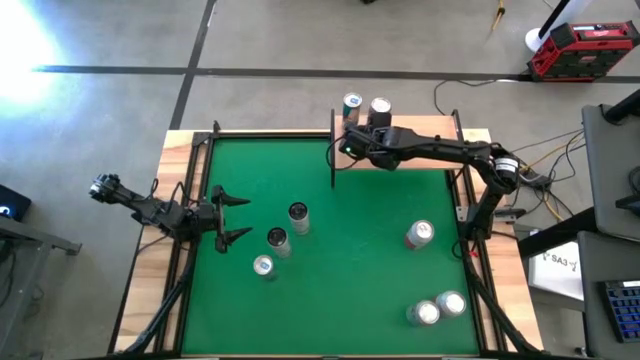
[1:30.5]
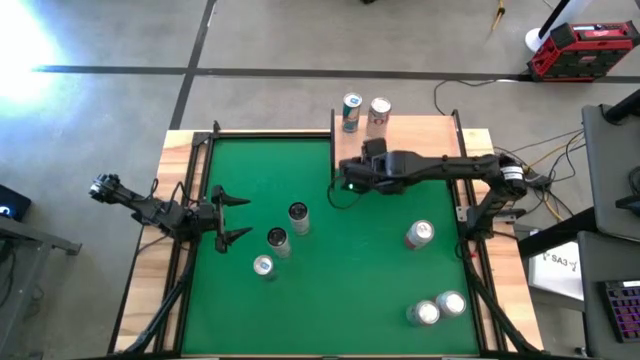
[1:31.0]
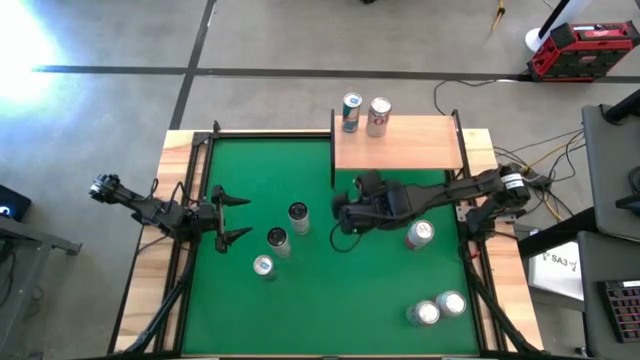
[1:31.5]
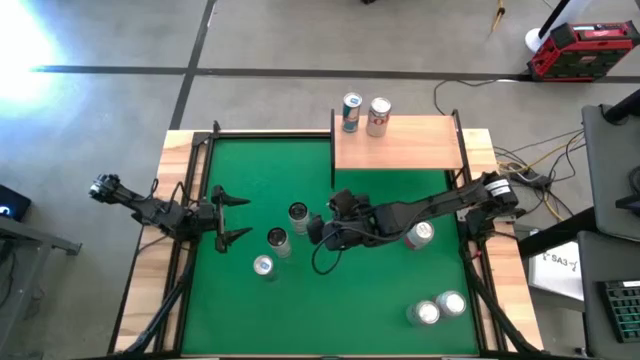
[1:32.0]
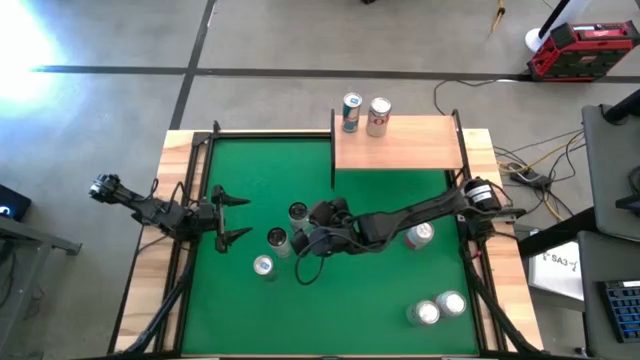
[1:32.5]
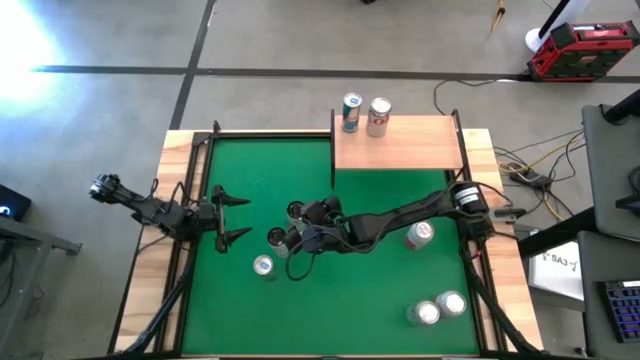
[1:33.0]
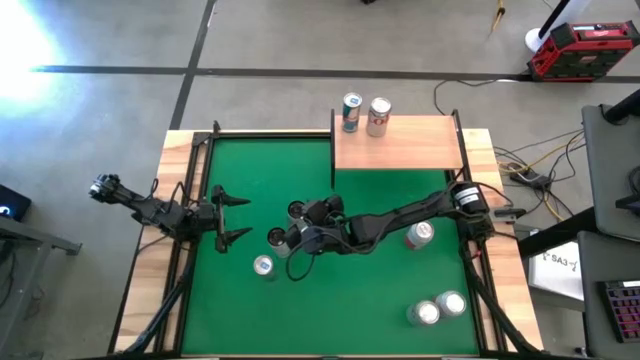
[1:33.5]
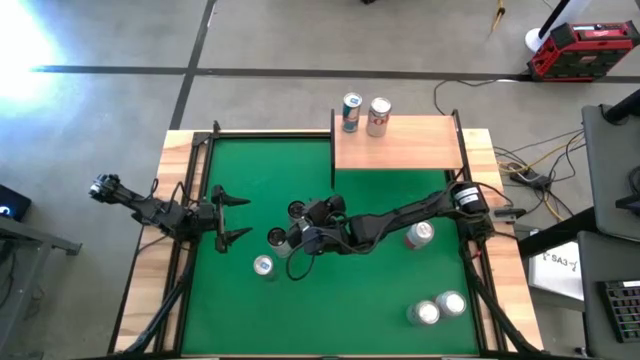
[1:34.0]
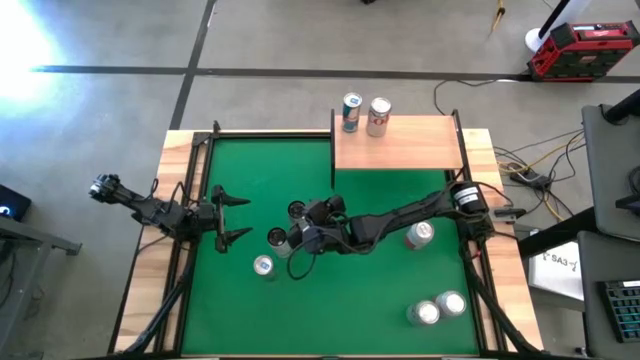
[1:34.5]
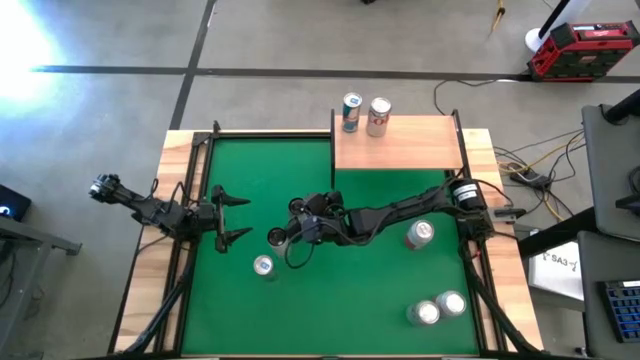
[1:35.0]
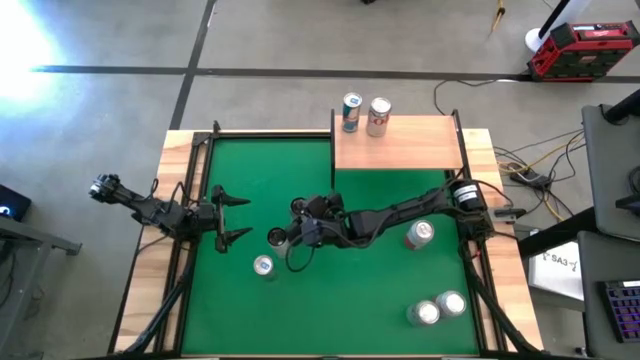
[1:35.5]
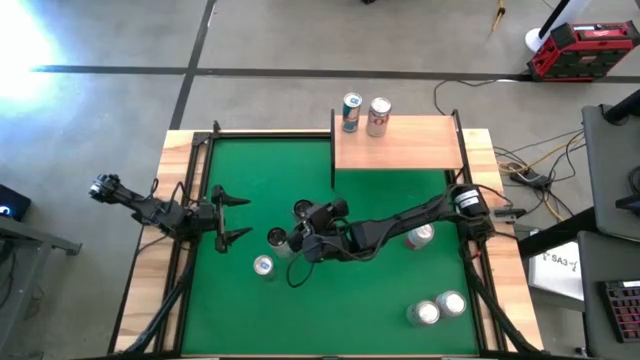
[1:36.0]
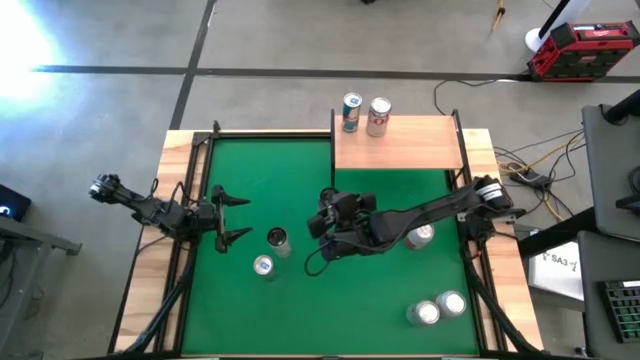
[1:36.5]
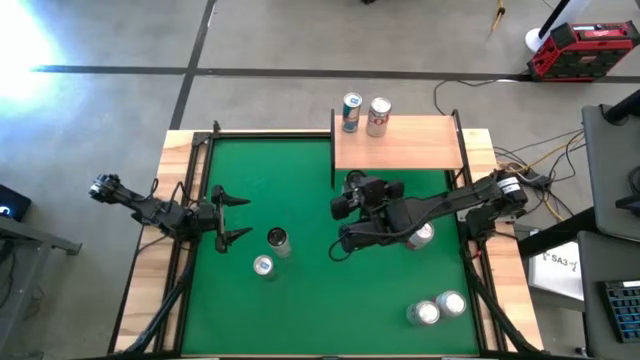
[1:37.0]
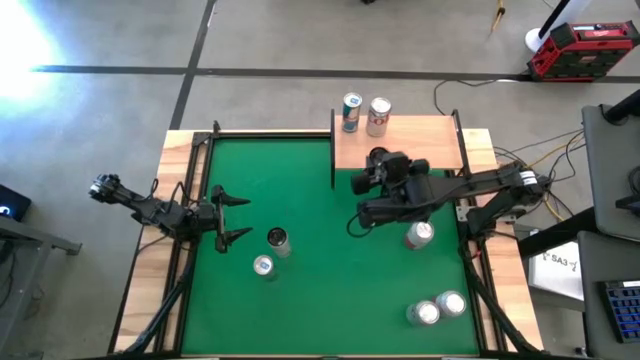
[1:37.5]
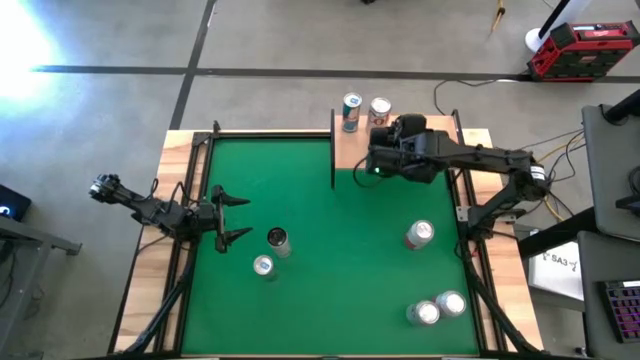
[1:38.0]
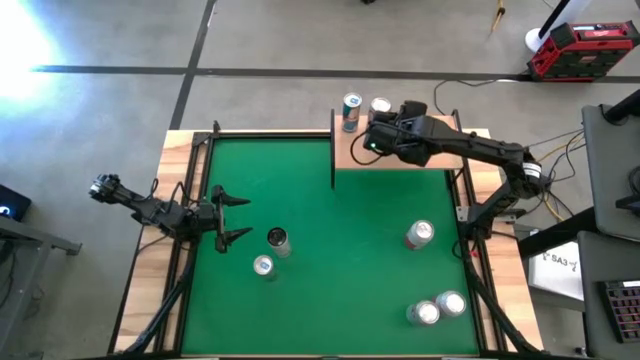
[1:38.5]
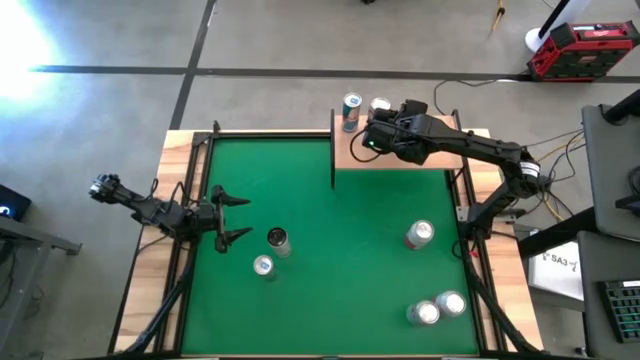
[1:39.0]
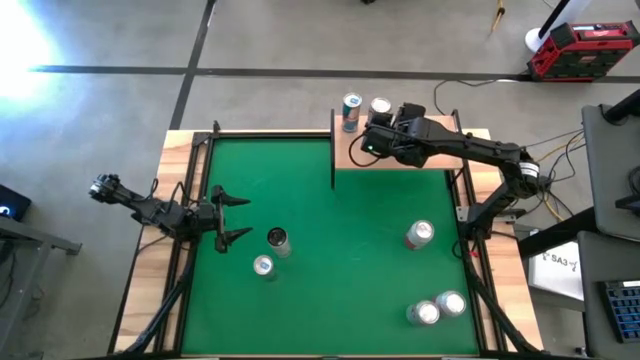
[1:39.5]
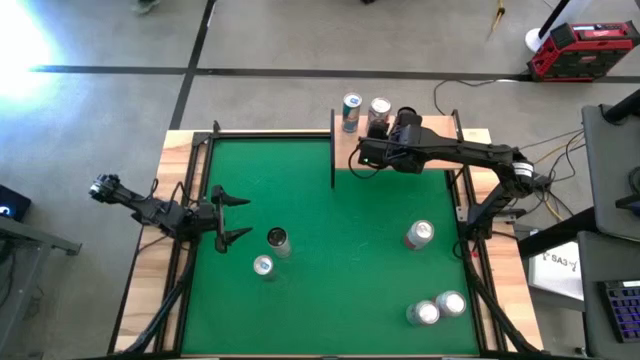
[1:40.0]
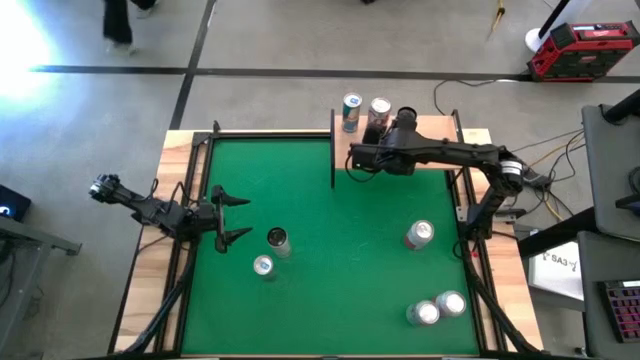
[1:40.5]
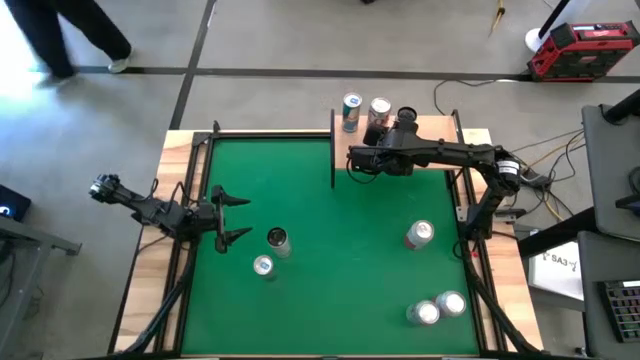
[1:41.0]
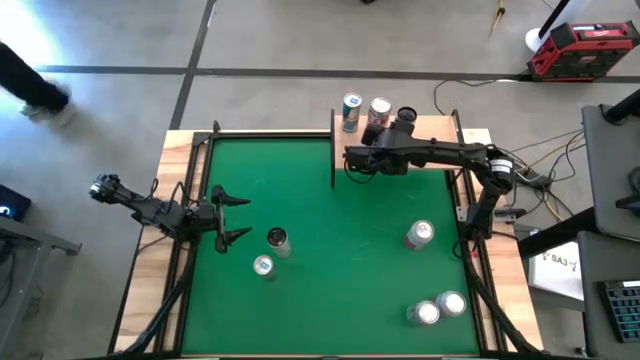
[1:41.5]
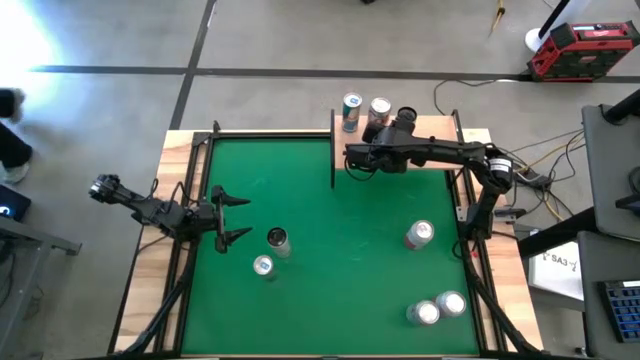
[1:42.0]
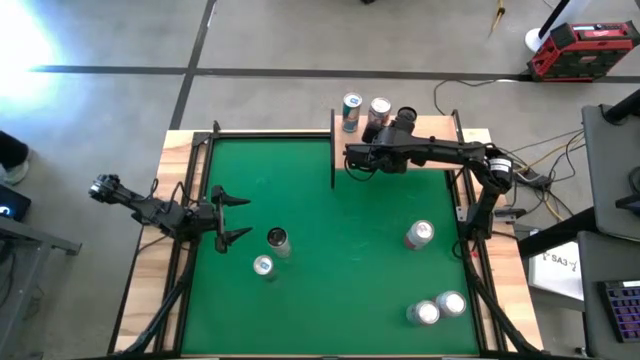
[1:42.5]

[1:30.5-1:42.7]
Task: Place canned beverage on shelf
Put the top white-yellow soda can on the shelf

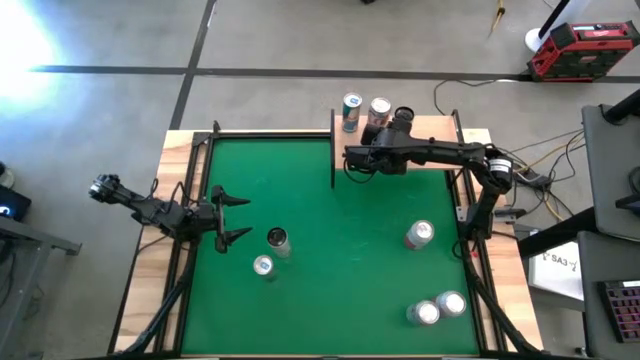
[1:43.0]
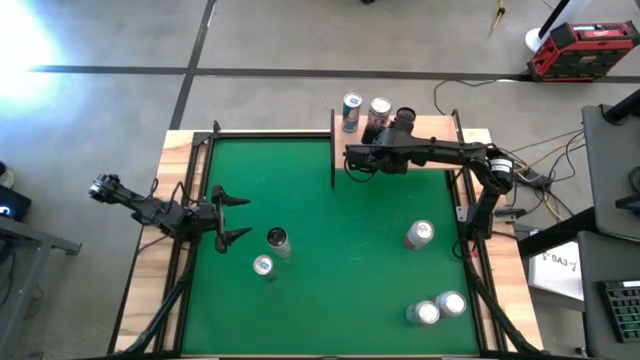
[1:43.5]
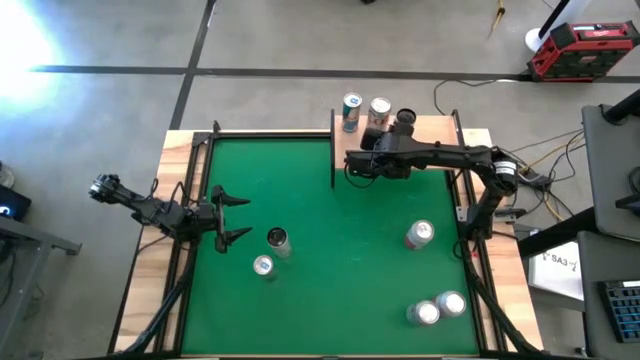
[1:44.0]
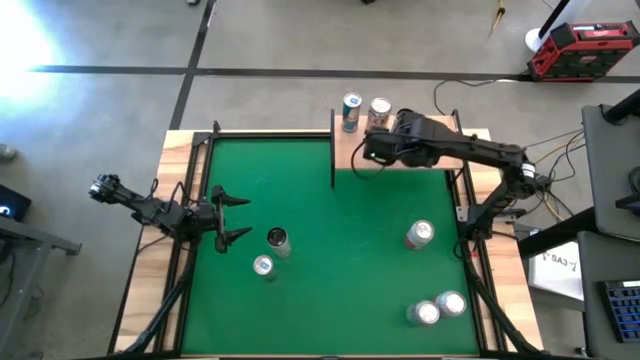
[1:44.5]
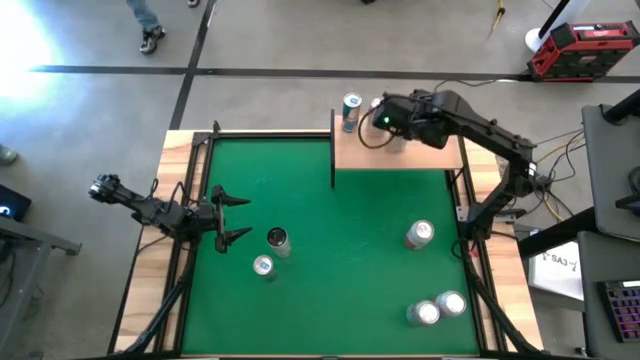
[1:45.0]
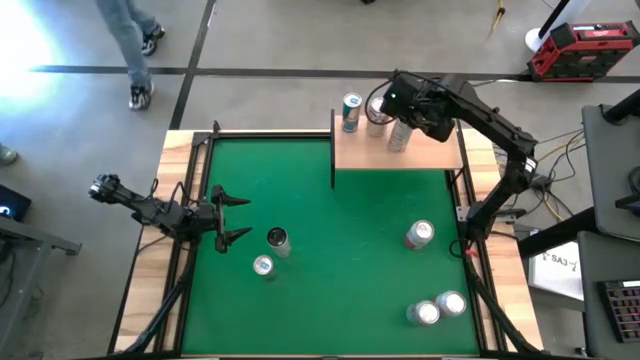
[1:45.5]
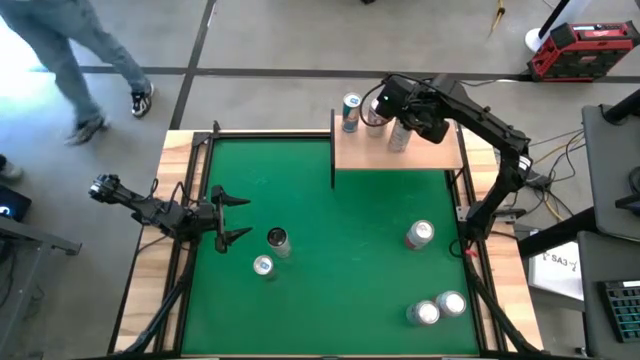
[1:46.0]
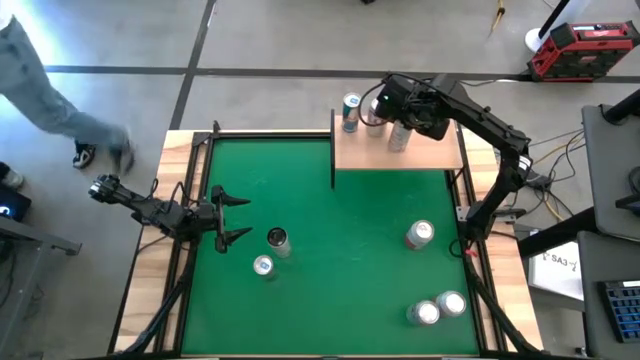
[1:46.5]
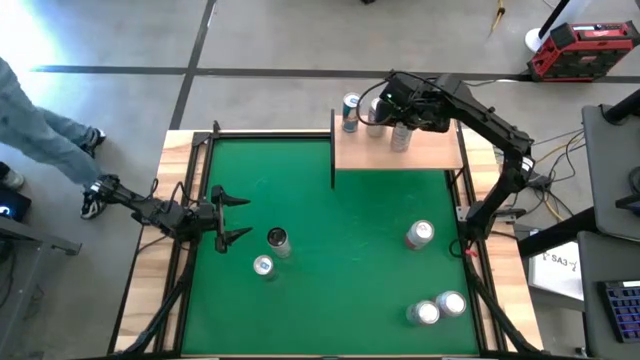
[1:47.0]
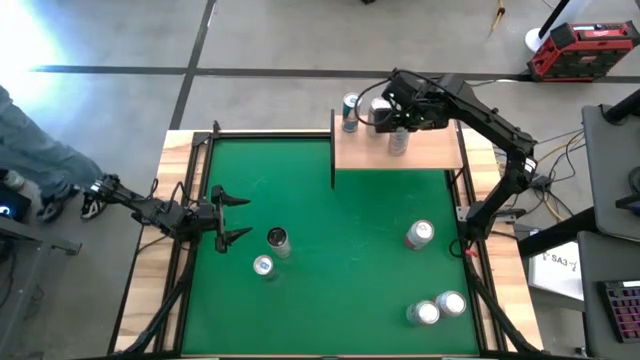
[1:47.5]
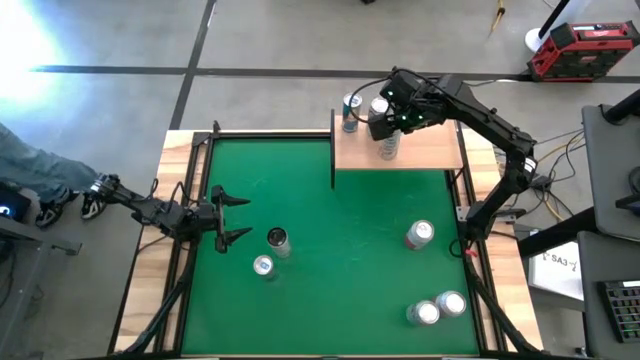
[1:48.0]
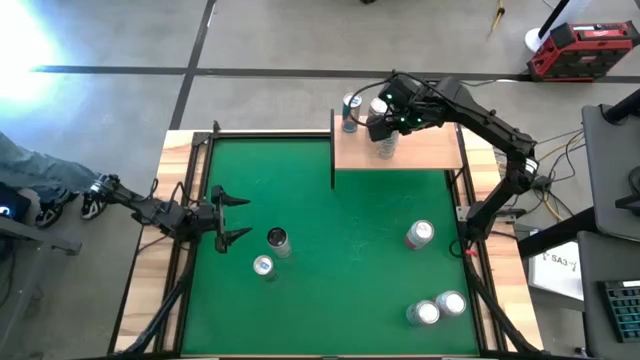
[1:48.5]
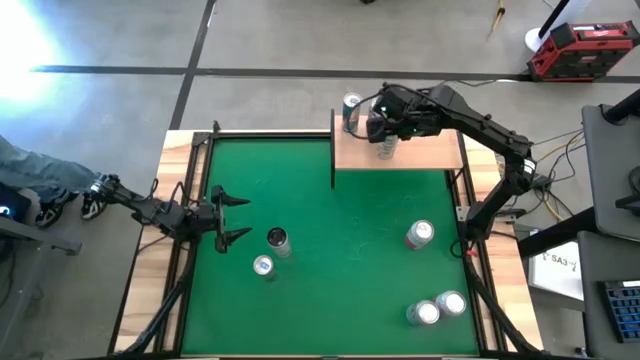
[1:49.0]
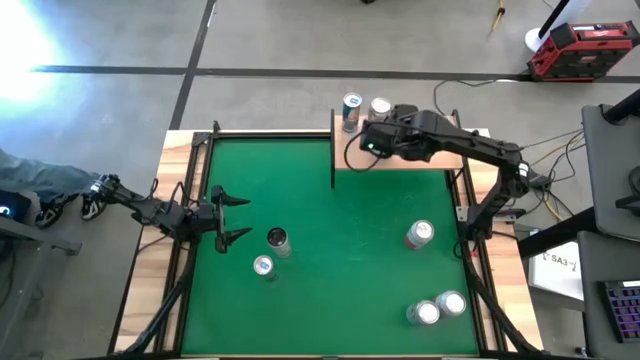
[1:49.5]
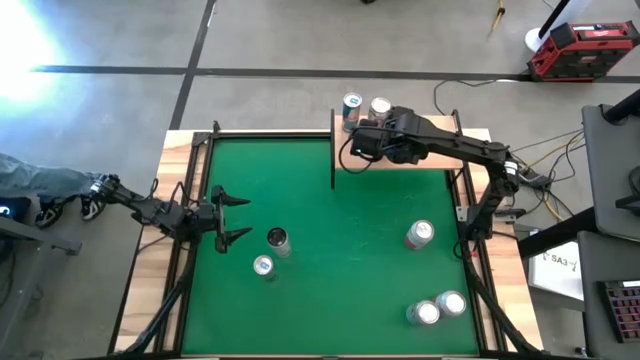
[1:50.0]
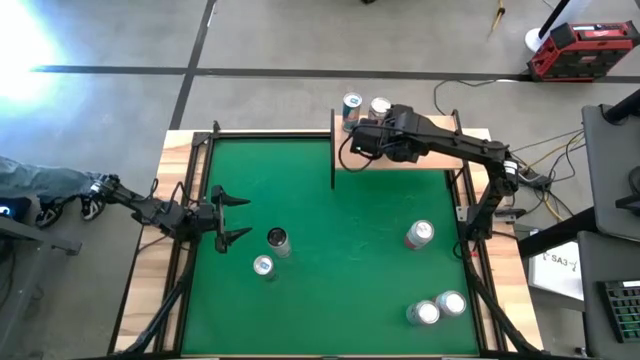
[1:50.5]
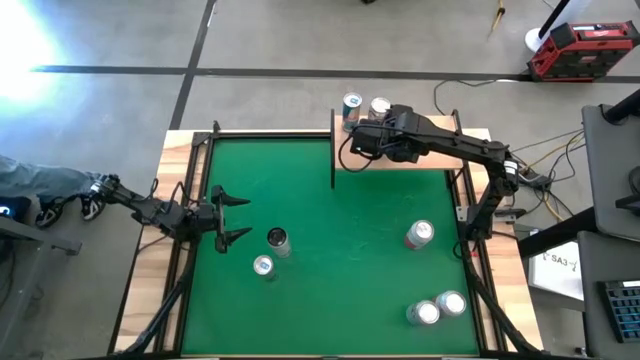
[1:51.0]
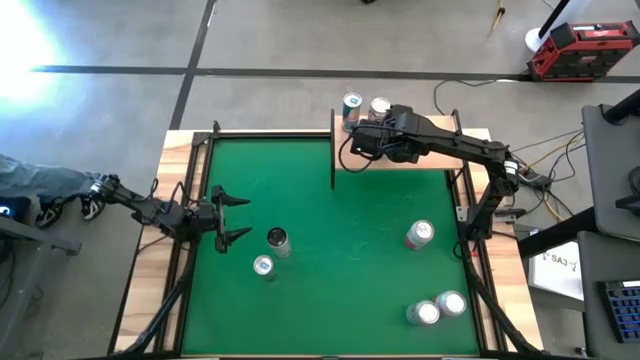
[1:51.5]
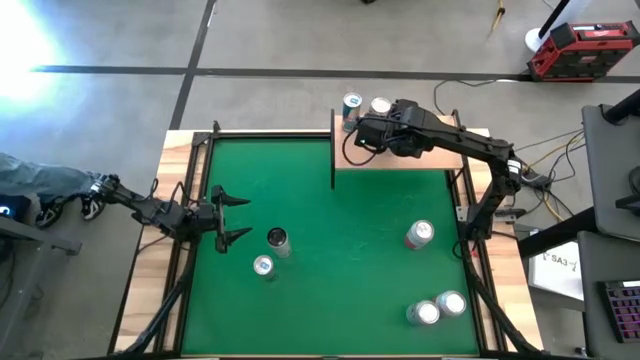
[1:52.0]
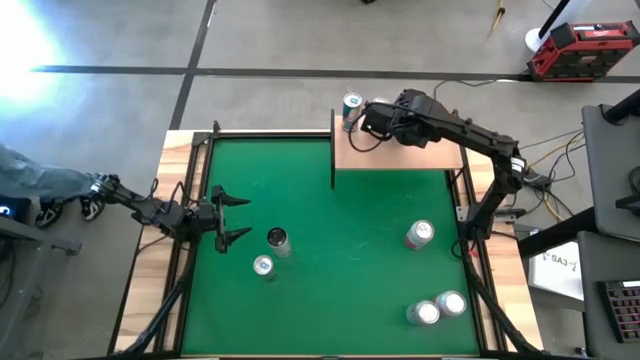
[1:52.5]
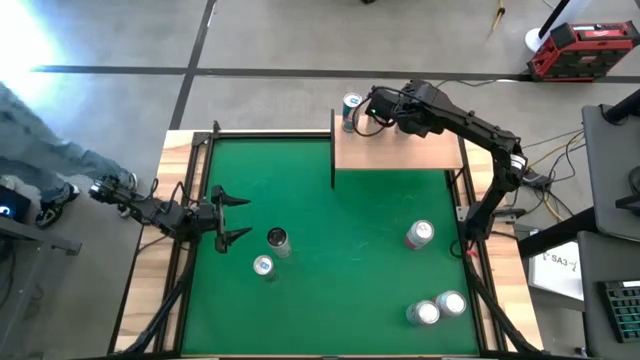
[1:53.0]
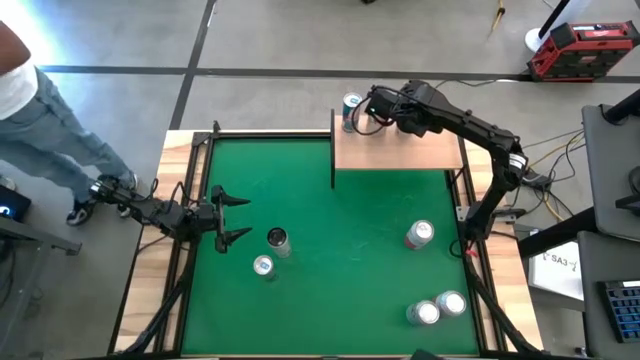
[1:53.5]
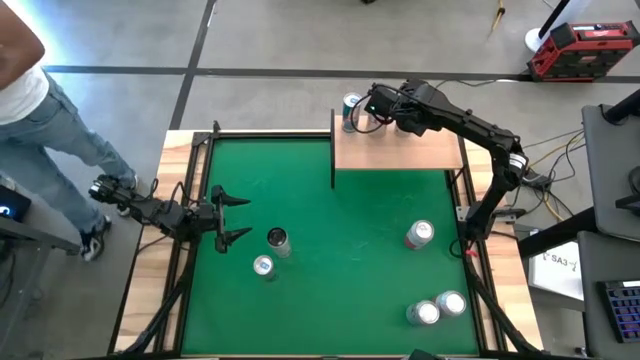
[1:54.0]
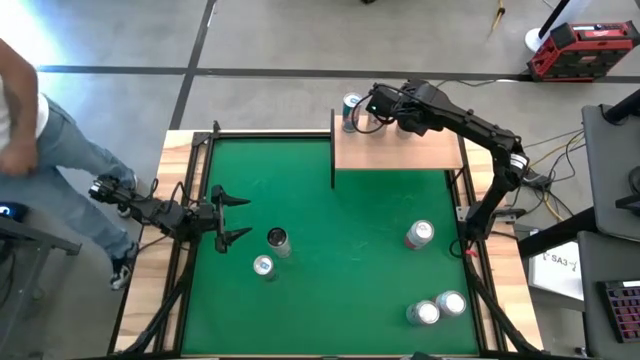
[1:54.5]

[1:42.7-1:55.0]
Put the top white-yellow soda can on the shelf
